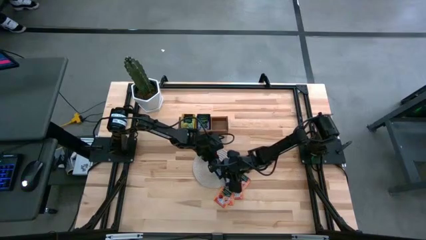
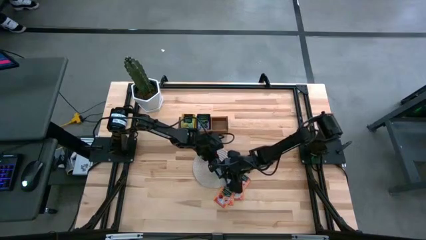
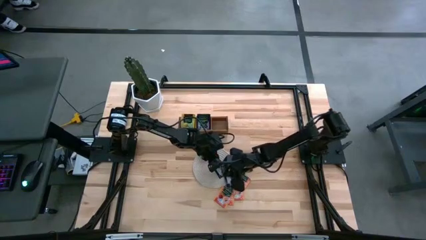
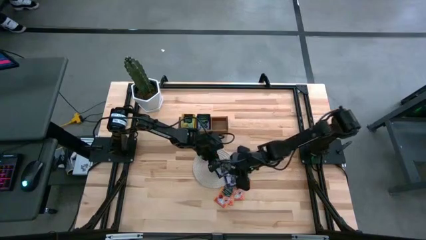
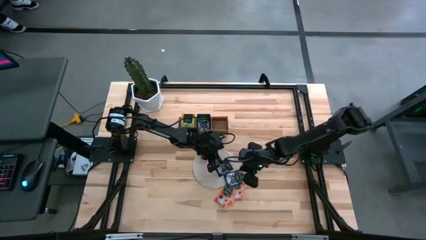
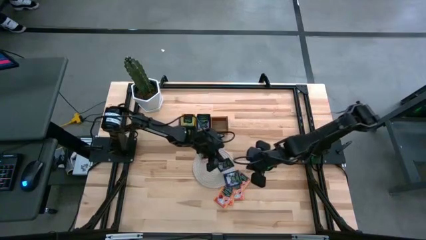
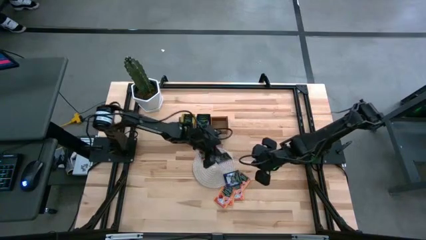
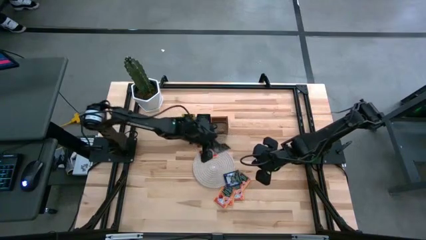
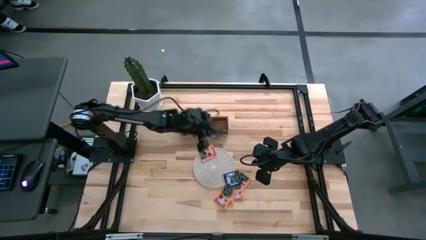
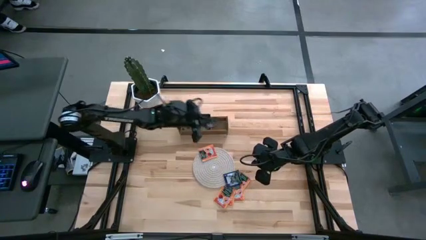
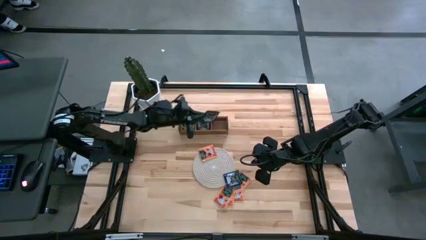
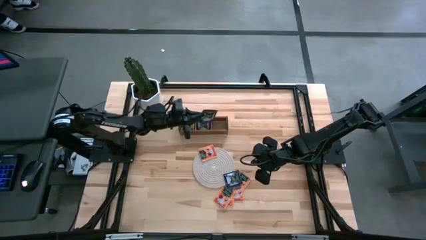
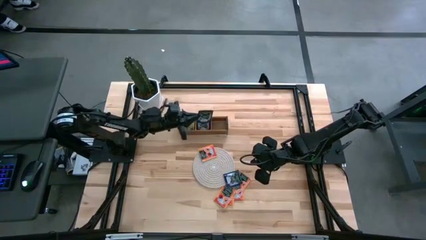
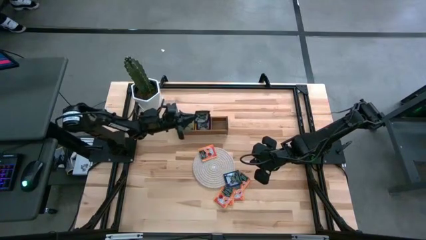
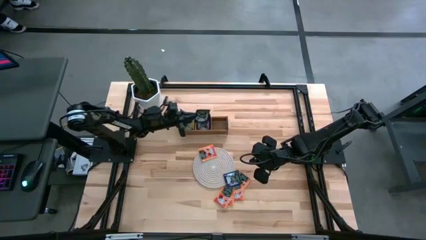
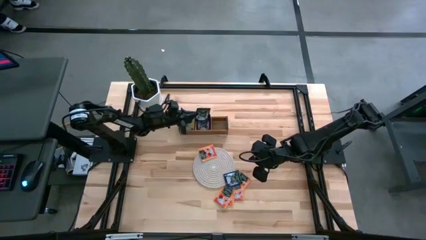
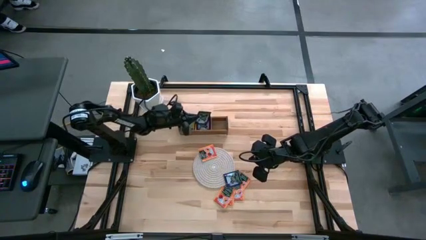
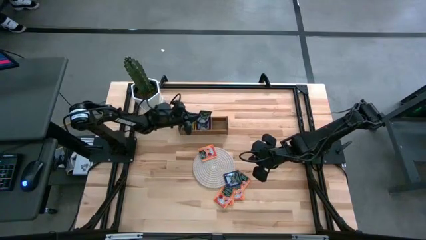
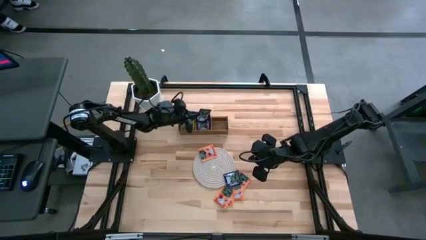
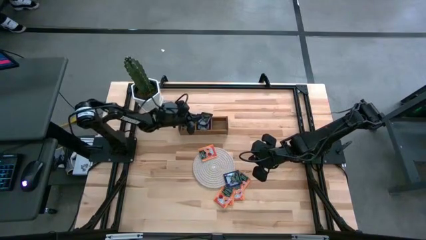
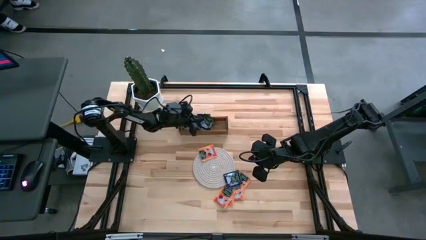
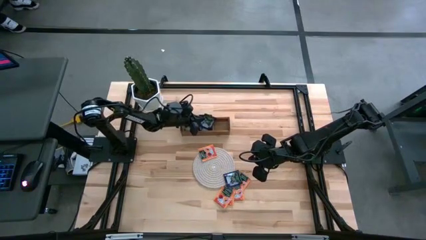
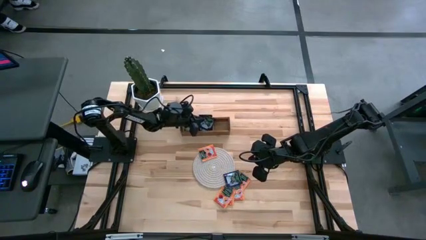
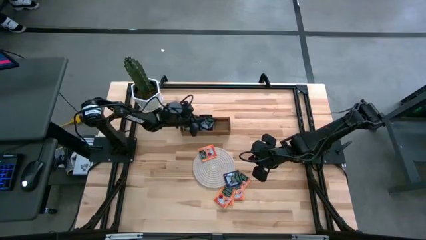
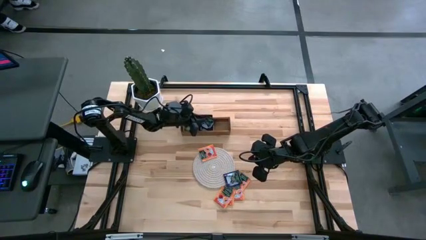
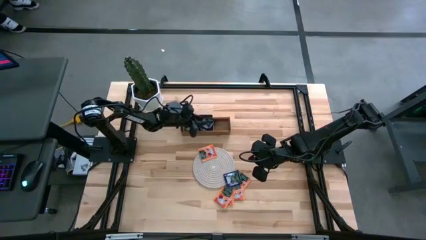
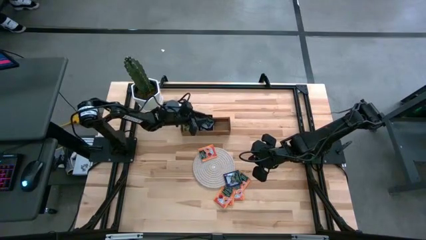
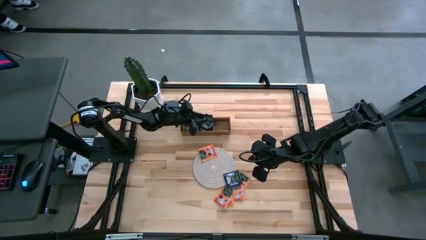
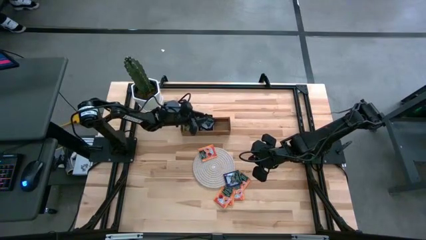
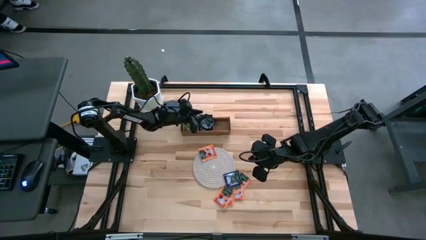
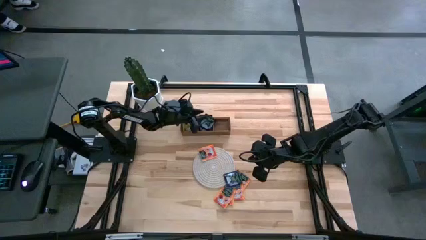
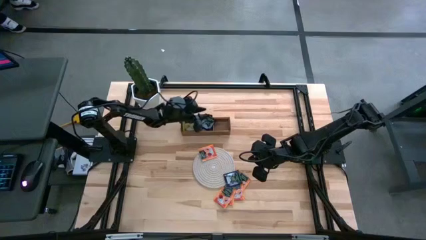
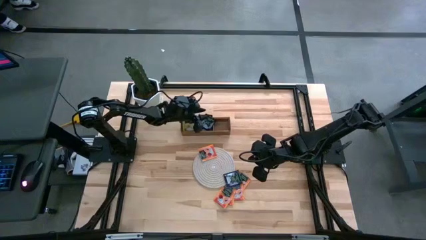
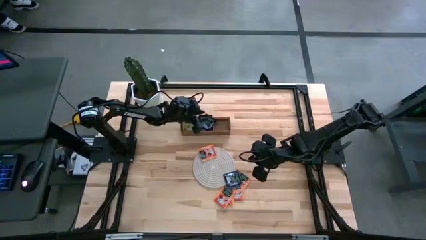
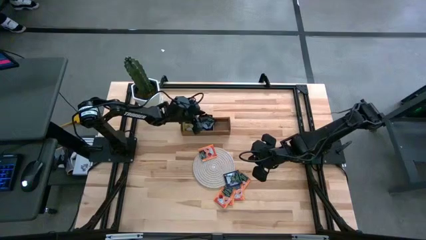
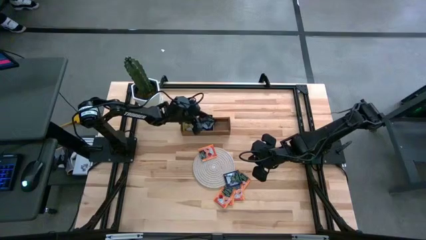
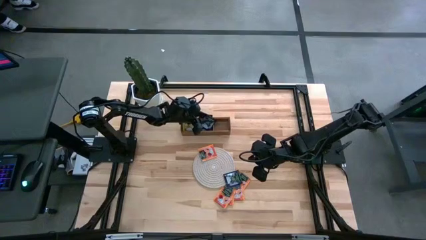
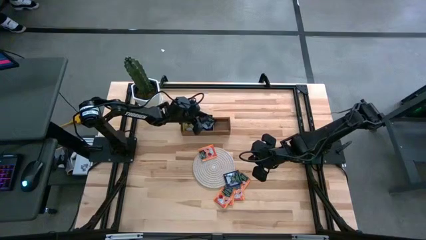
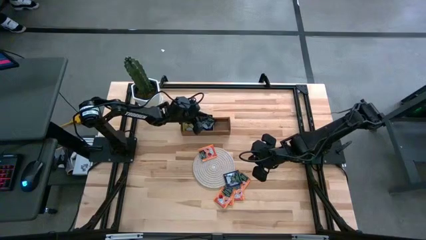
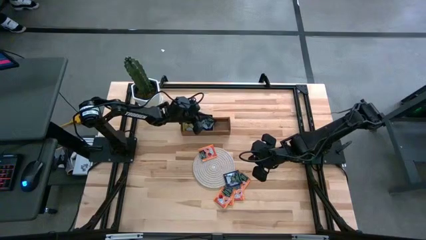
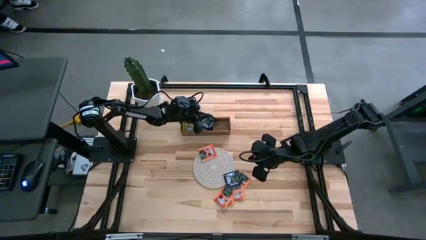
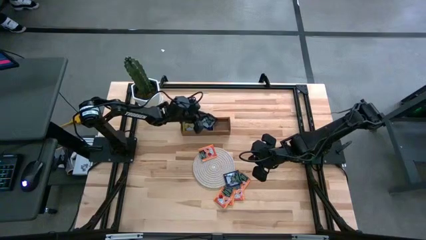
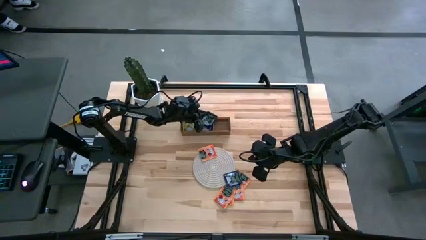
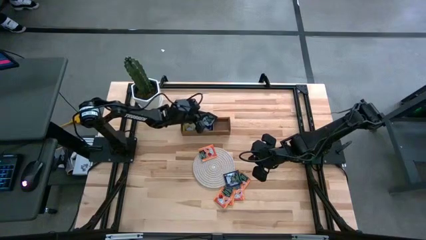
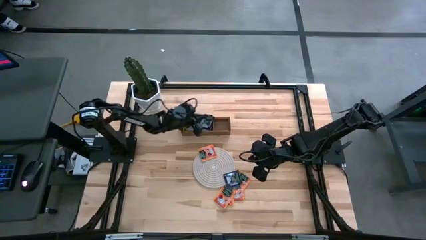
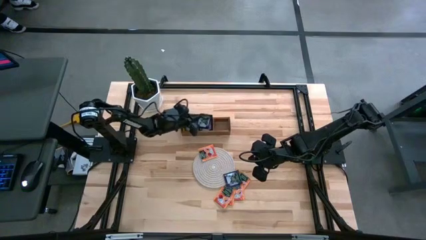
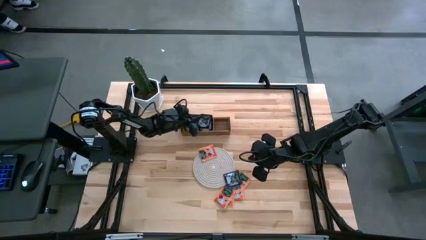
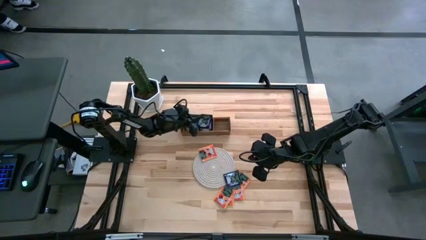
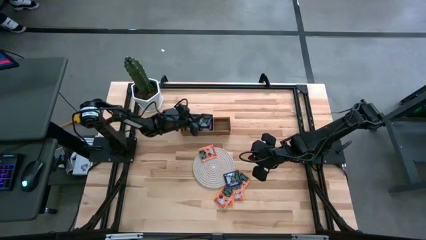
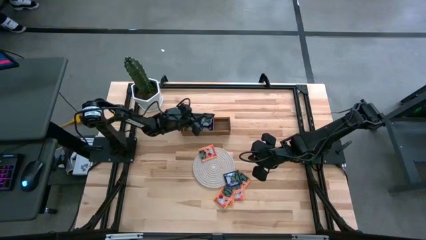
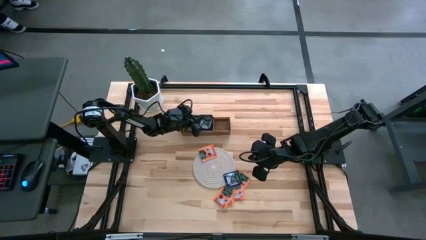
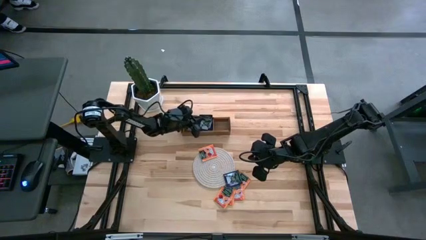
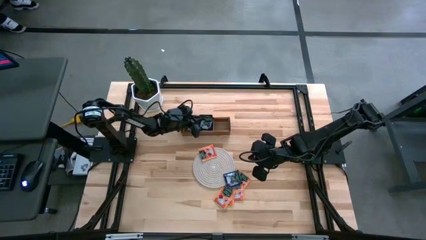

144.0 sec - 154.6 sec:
Task: Pick & Place Tea
Put the purple tea bag into the middle section of the wooden organizer

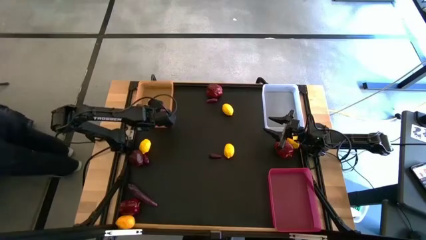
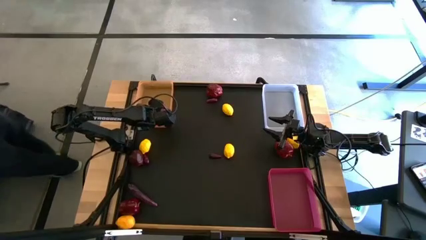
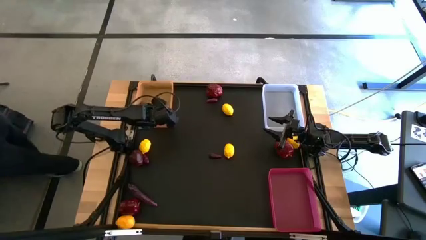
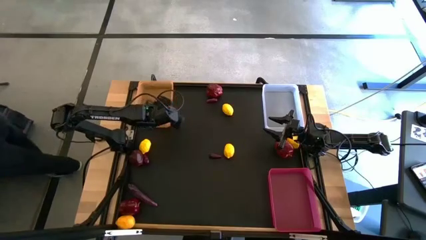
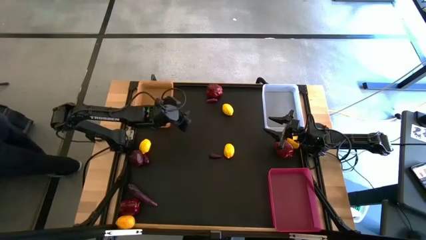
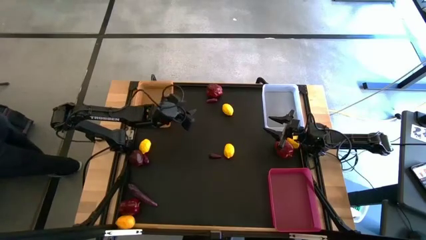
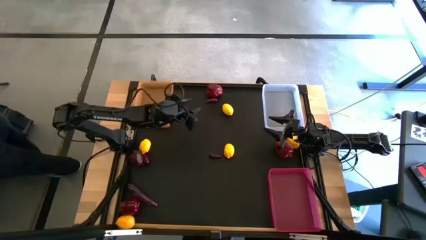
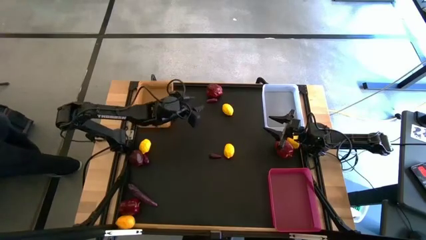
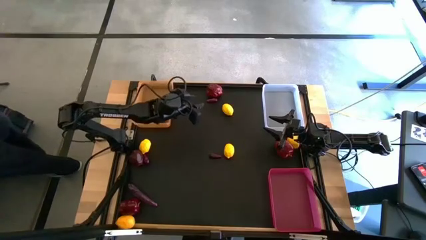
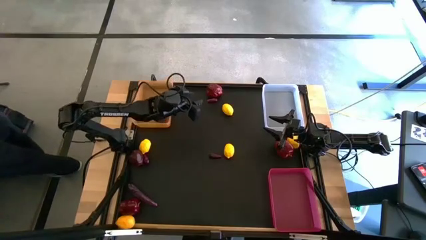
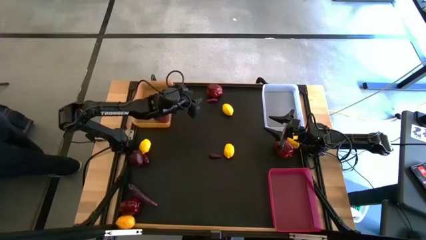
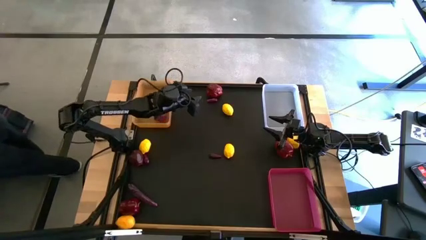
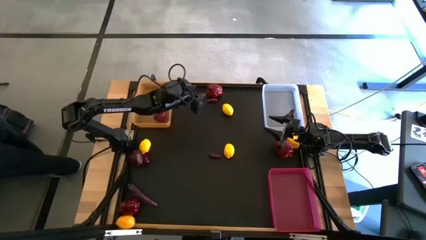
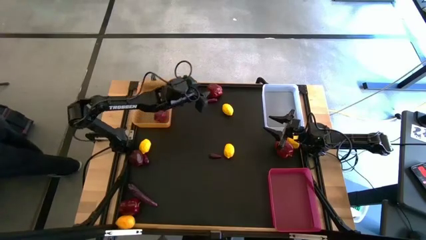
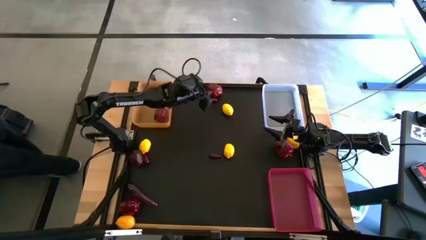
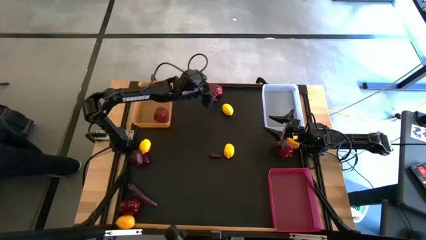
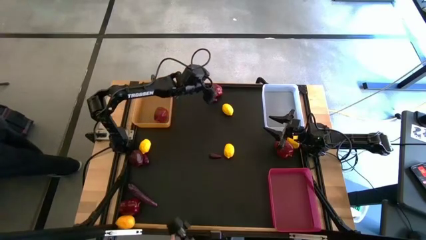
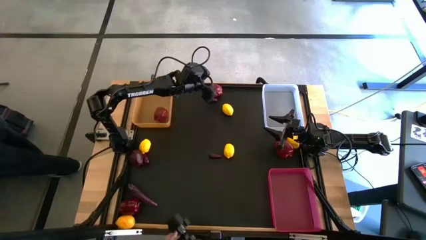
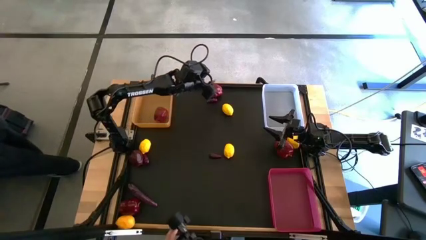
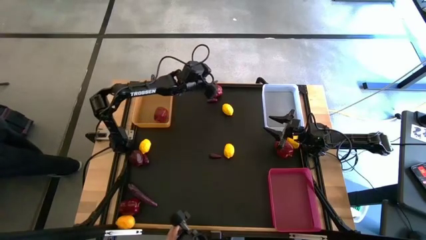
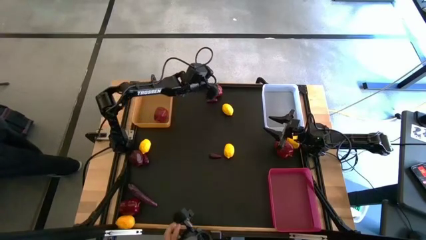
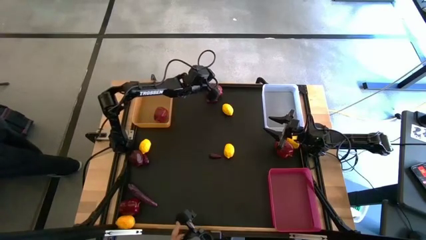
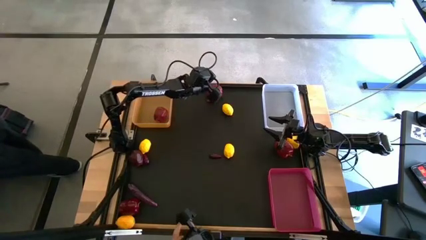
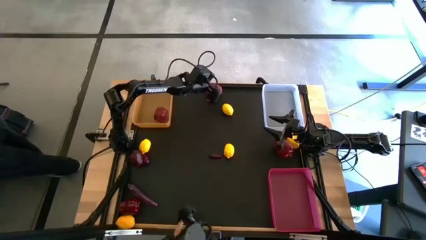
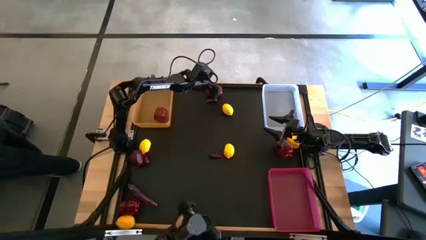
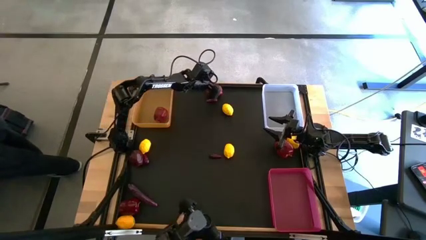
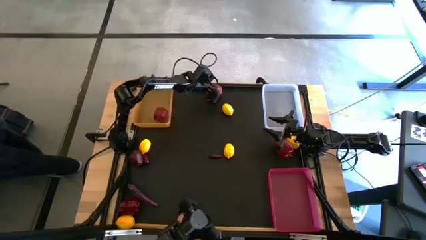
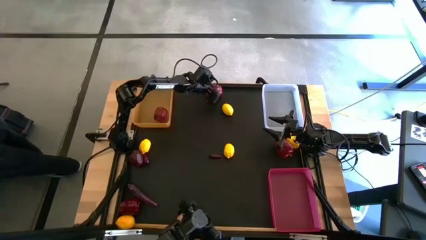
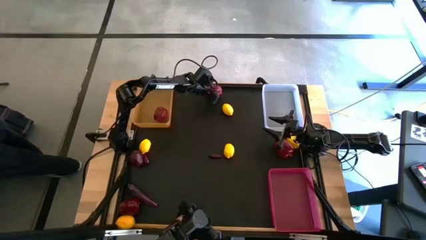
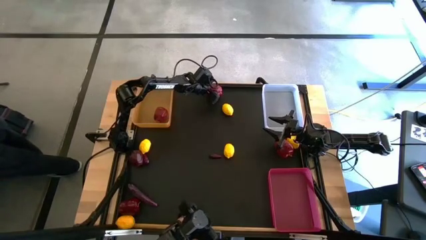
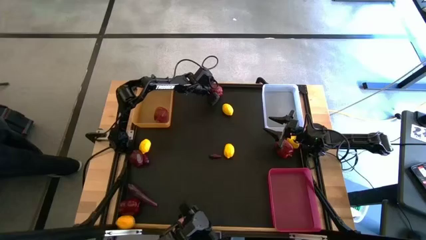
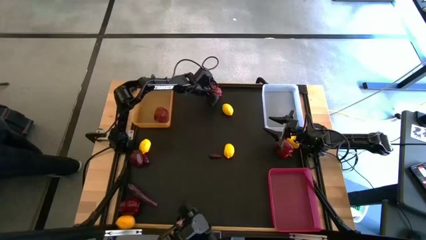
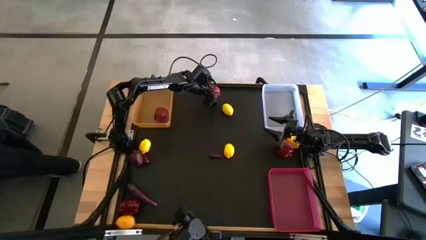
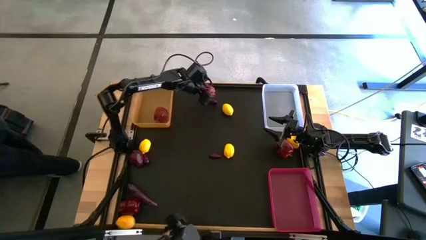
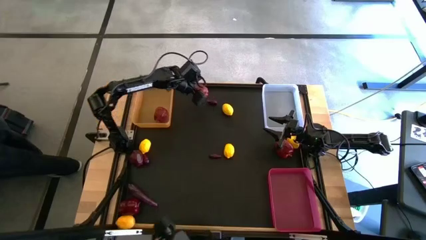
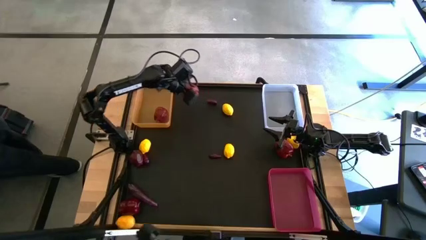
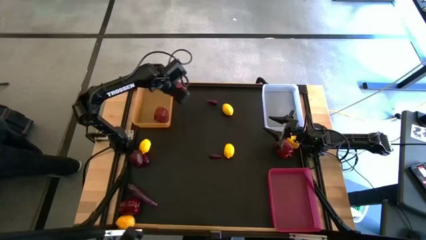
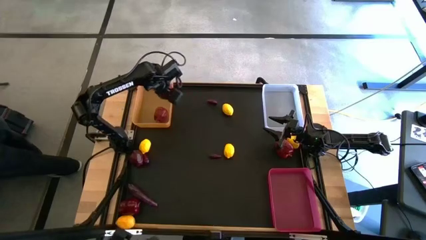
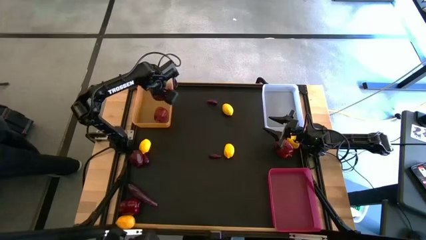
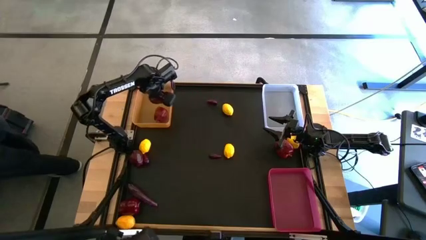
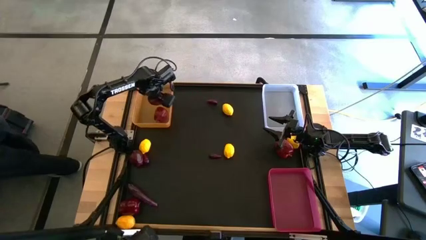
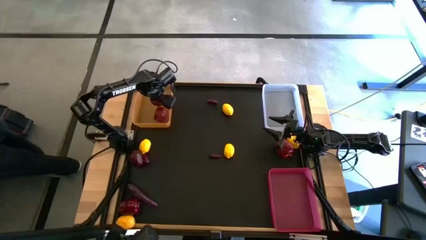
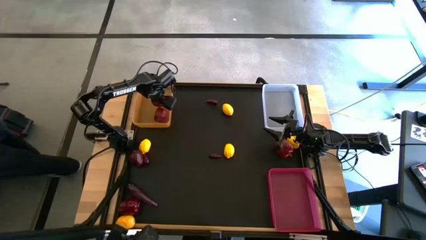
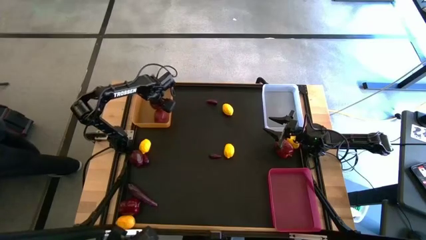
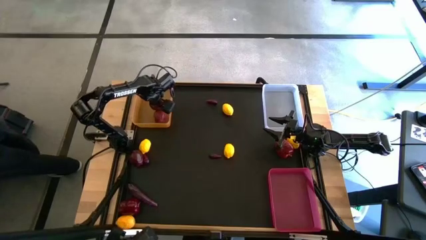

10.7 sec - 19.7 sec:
Task: Sort produce into baskets
Put the apple into the orange bin
